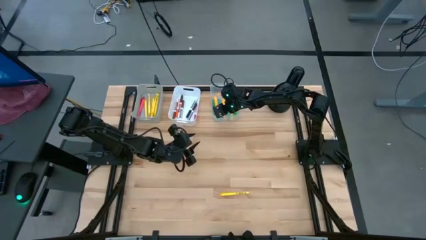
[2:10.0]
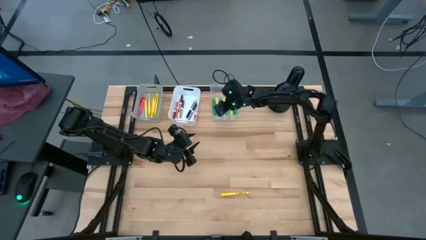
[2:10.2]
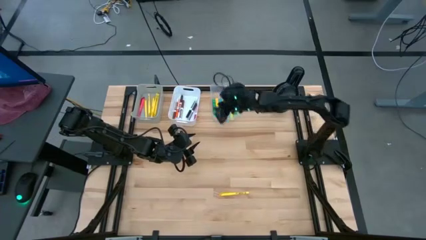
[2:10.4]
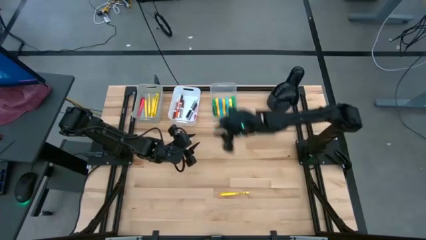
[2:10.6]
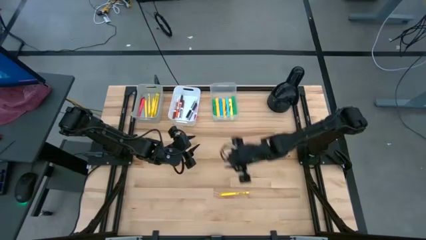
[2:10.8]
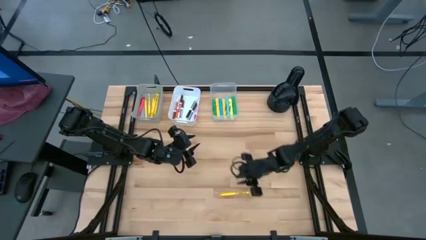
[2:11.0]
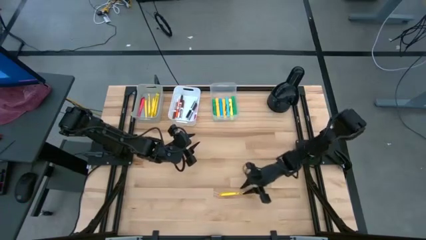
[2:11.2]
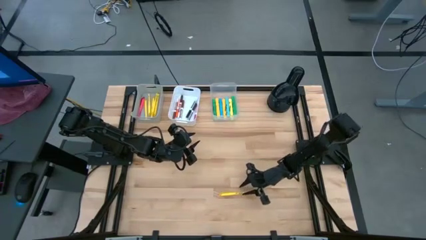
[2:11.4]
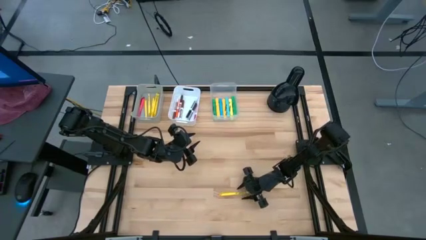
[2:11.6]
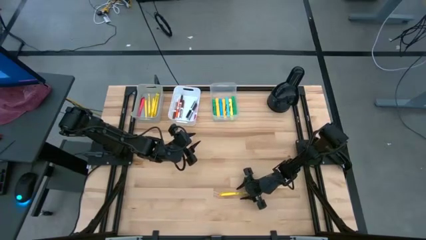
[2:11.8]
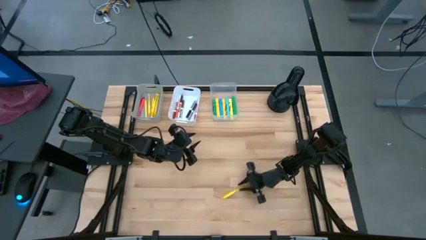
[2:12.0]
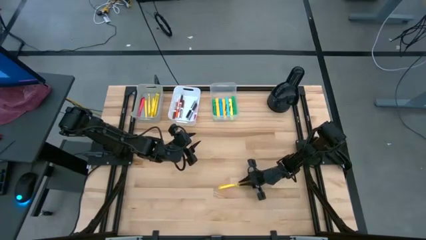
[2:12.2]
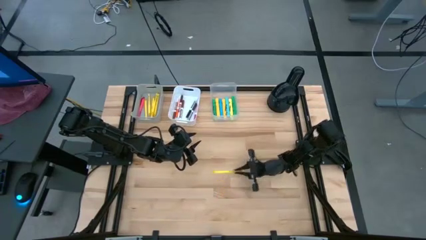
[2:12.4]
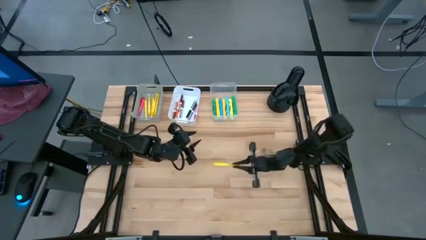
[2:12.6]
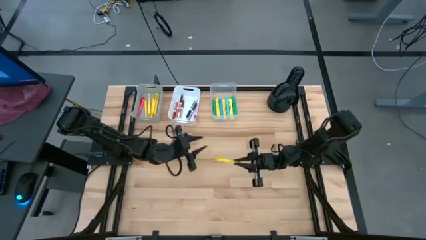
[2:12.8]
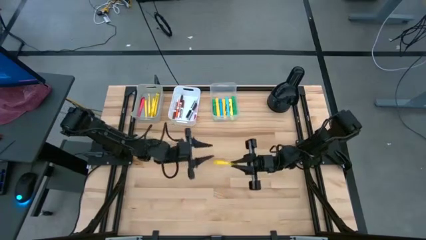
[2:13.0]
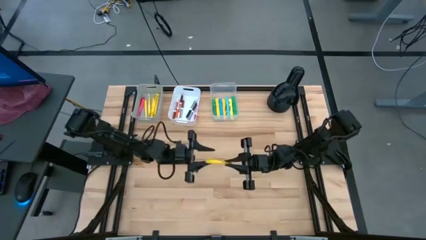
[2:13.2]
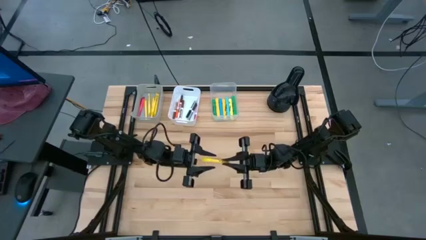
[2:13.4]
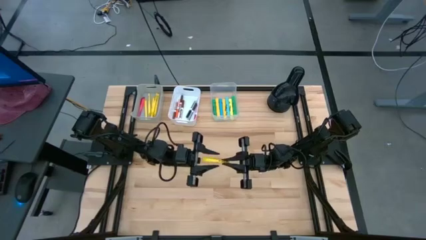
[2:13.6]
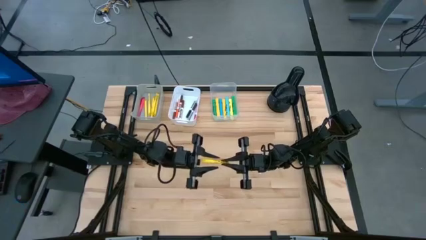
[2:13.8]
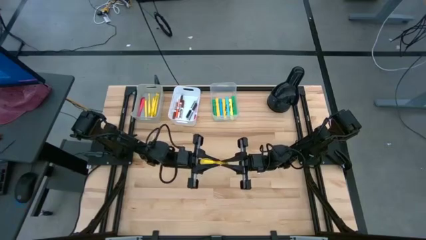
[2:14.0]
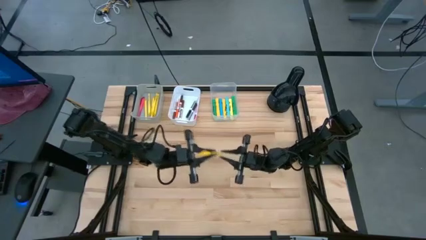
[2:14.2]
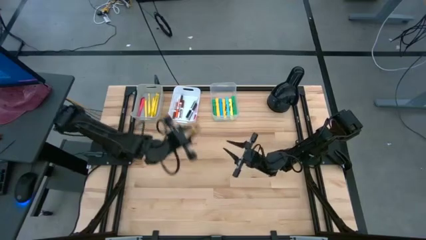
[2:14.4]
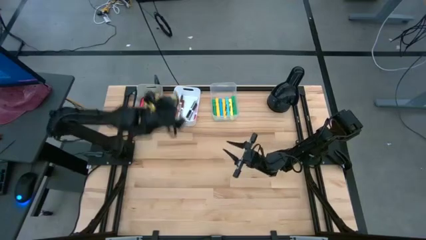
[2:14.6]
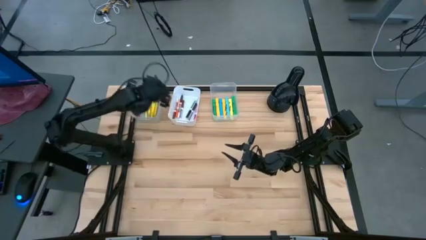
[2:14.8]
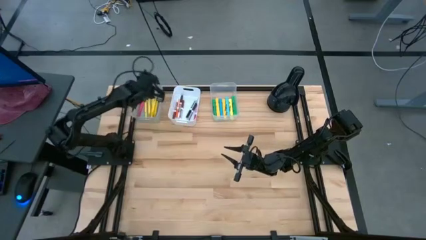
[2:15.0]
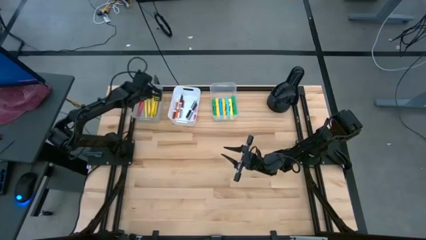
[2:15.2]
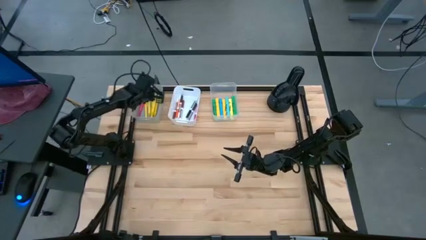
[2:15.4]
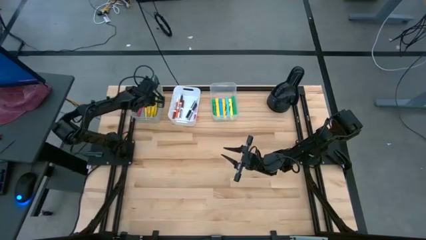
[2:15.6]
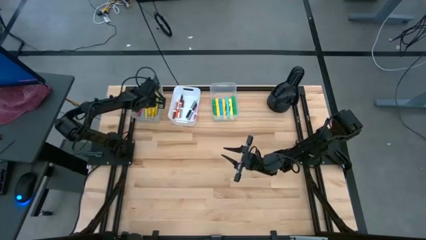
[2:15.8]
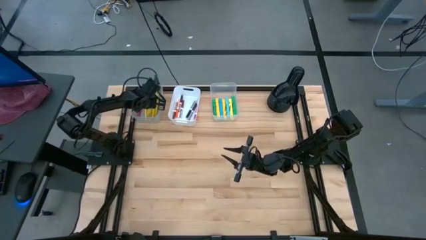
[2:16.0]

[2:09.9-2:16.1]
Task: Pick & Place Markers
Put the yellow marker into the gray bin

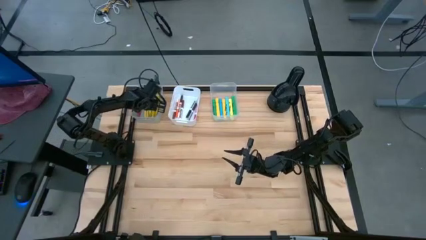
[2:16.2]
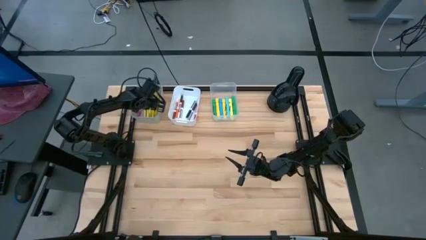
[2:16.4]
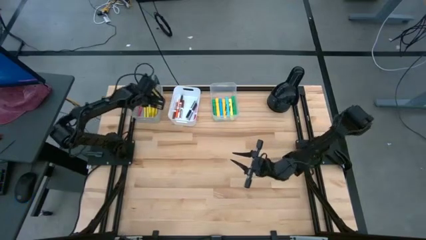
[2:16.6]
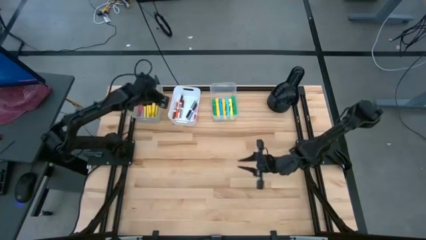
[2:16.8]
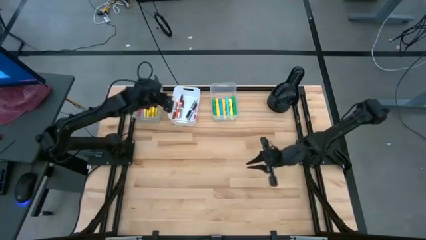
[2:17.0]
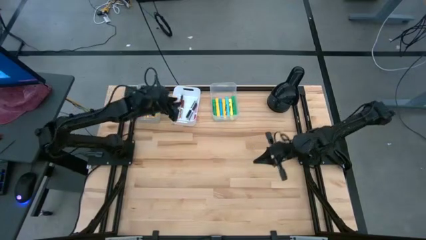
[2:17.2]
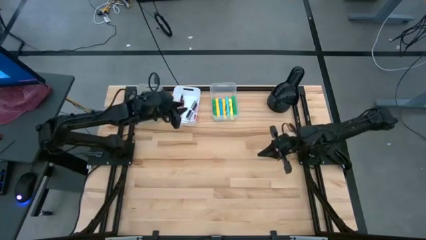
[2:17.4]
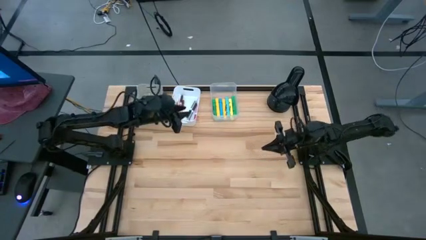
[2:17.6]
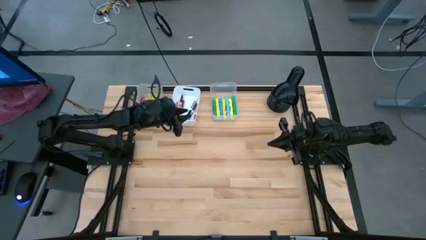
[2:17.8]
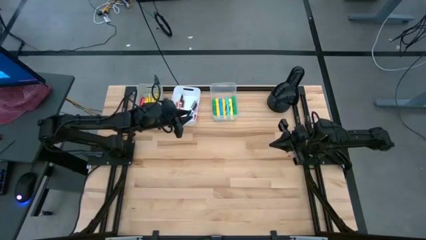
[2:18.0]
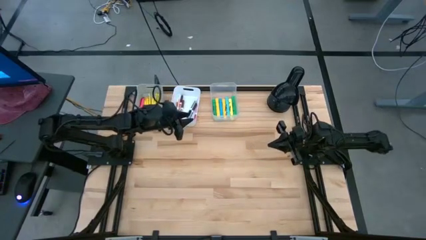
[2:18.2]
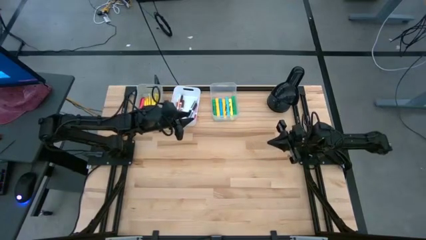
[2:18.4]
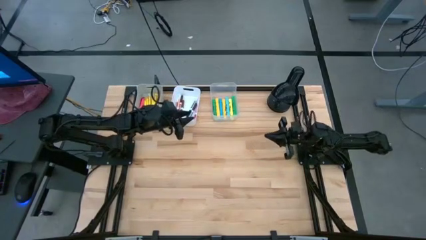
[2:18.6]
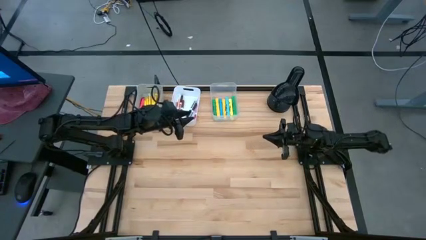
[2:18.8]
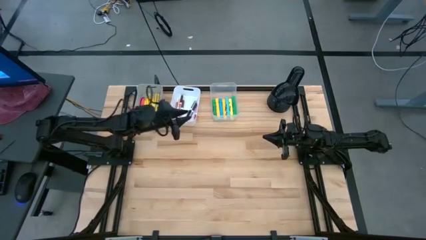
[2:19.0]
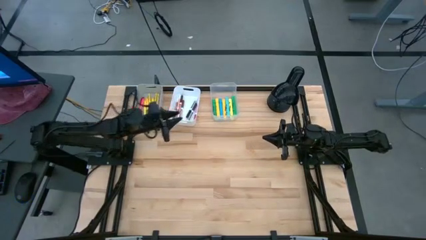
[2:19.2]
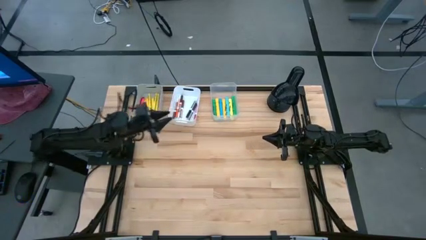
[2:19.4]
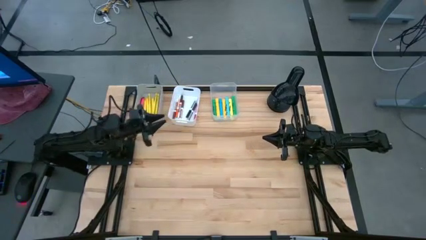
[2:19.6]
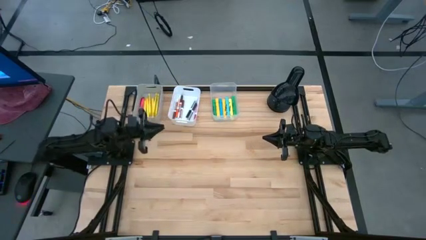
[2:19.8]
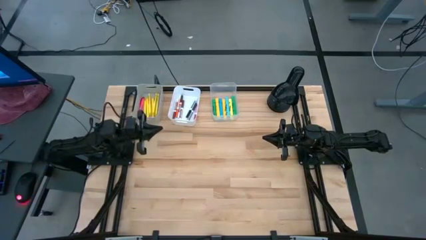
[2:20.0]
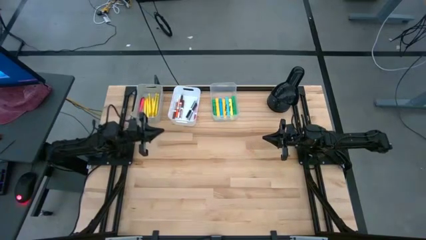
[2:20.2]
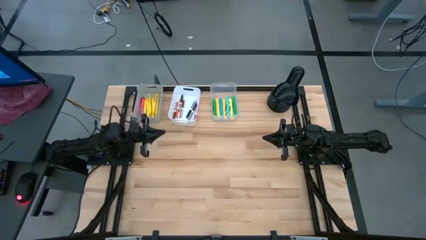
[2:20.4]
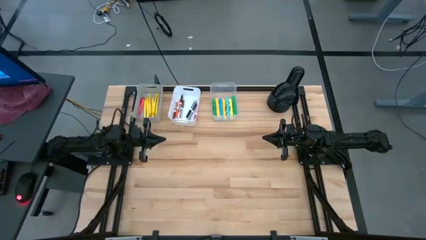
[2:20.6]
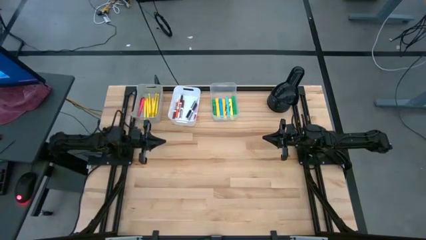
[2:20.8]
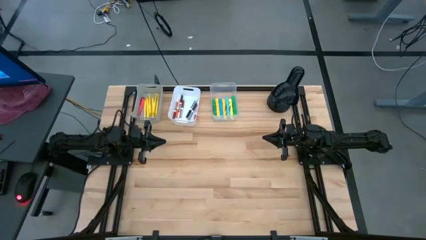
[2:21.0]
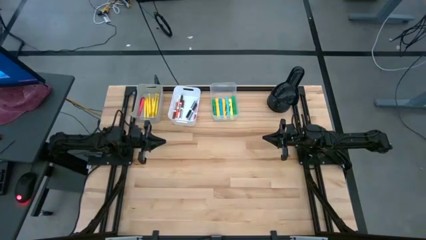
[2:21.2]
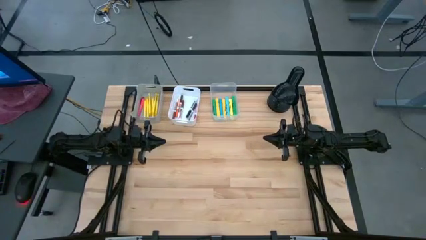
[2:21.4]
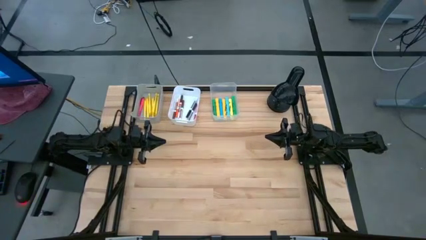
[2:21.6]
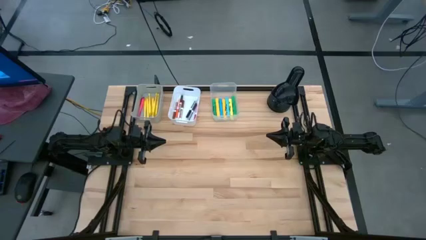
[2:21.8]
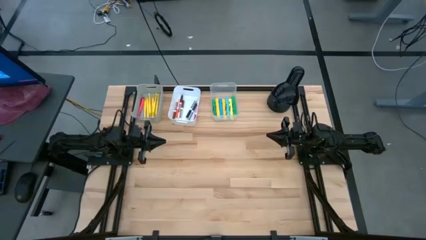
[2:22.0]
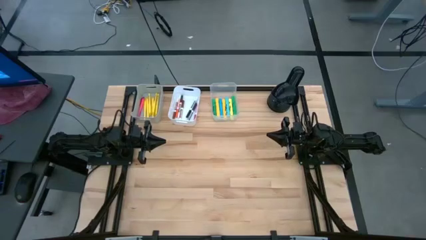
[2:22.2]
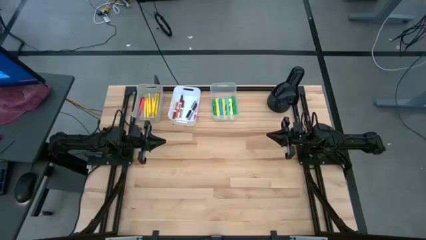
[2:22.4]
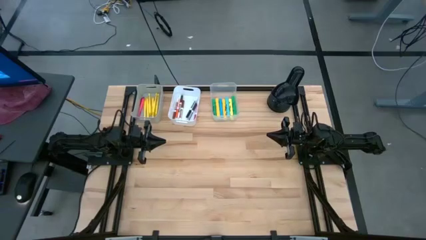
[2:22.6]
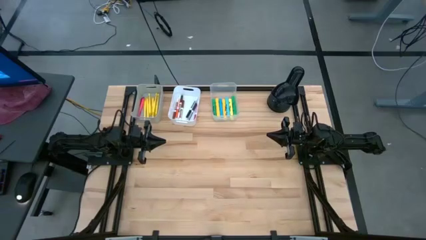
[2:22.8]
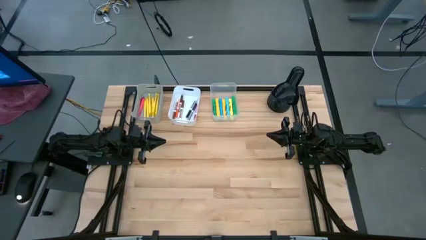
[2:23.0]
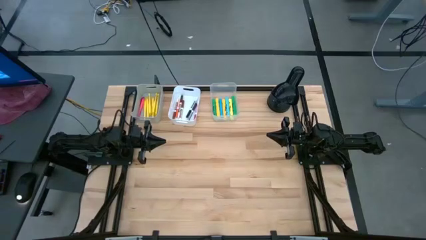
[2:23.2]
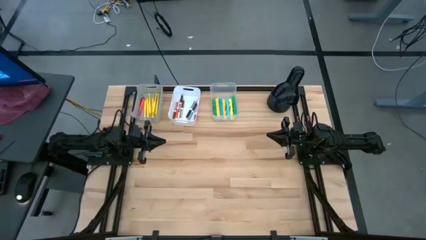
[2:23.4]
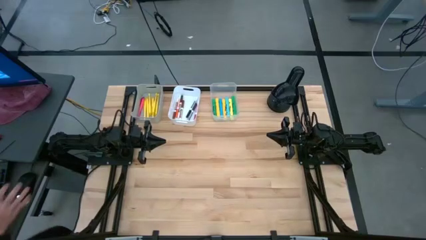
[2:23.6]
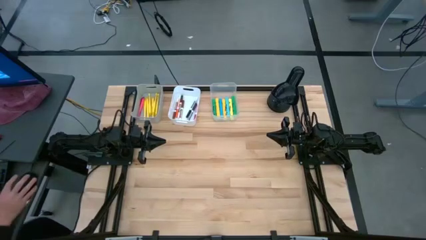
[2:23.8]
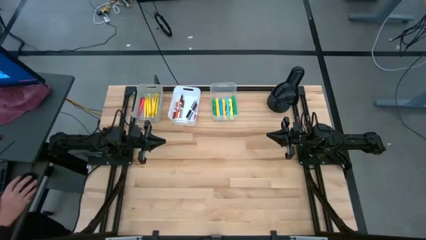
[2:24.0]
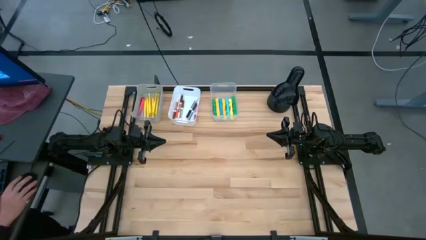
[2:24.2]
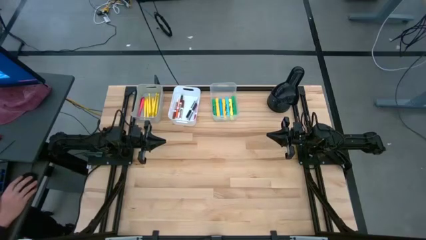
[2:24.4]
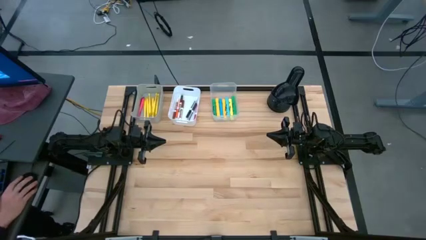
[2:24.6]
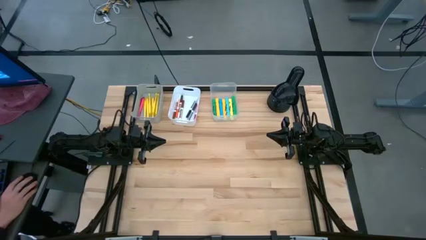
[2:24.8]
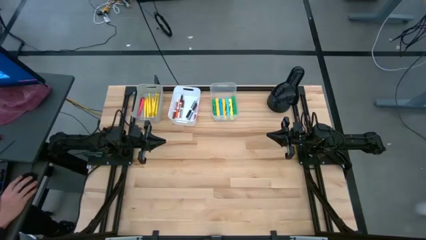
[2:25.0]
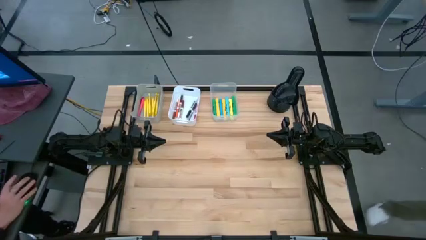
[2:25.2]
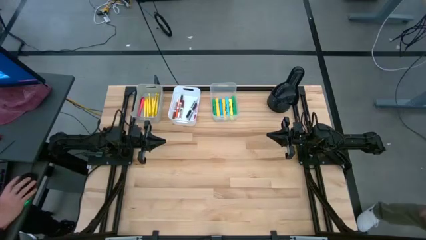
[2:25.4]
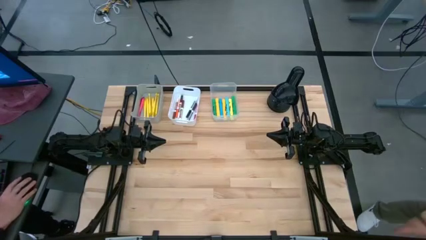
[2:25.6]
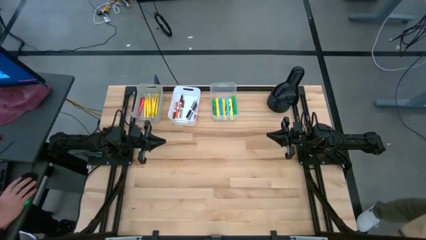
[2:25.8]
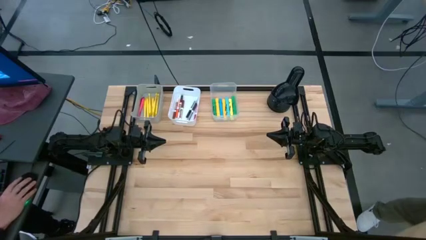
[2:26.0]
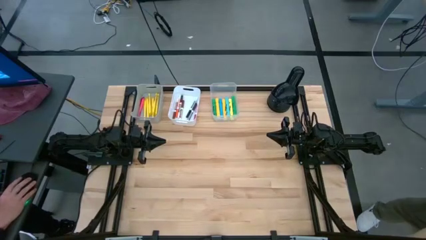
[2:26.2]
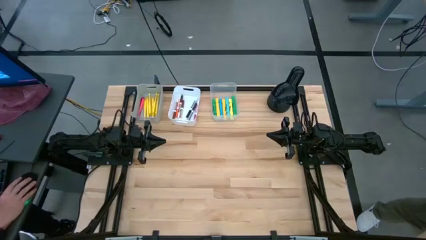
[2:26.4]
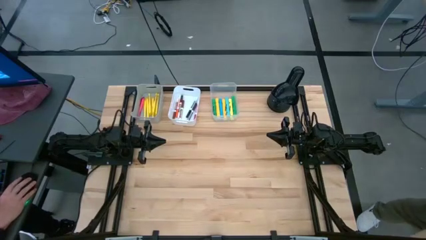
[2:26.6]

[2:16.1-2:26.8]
Return to Home Position
